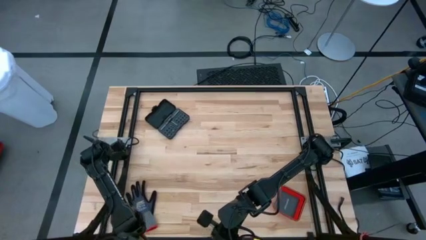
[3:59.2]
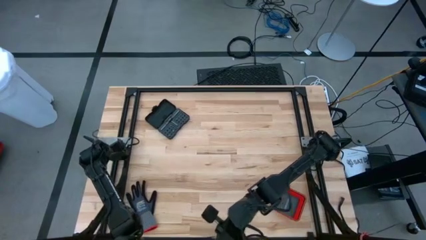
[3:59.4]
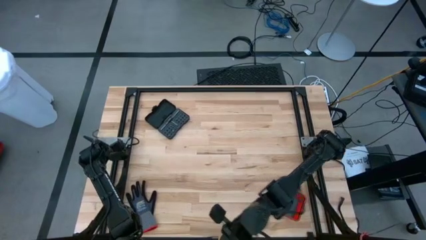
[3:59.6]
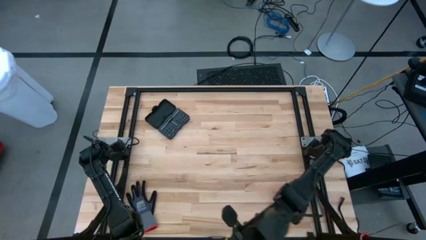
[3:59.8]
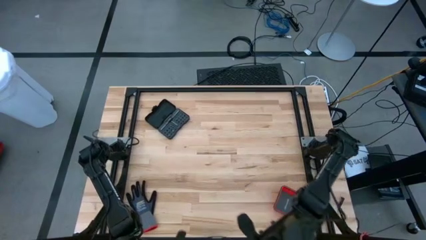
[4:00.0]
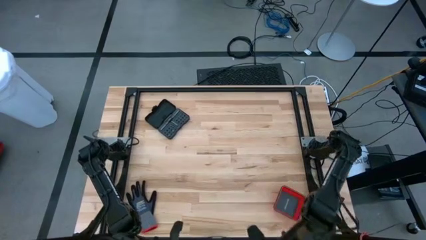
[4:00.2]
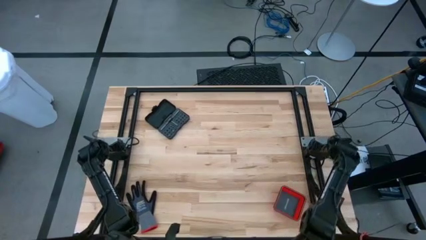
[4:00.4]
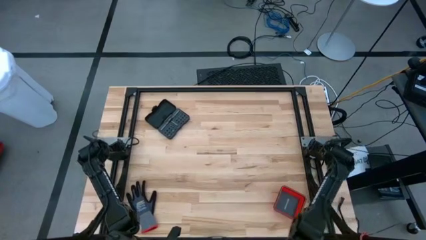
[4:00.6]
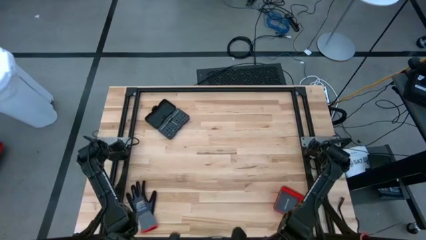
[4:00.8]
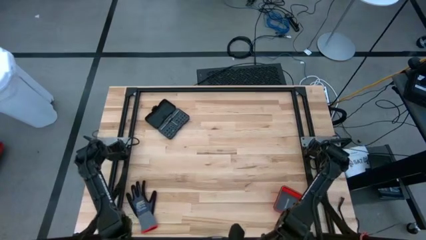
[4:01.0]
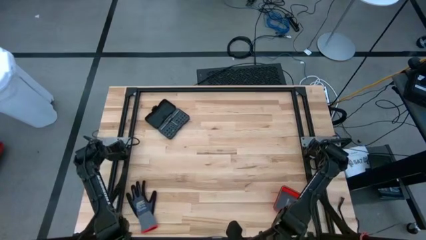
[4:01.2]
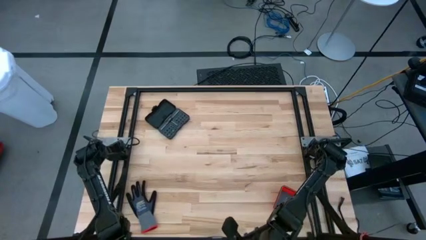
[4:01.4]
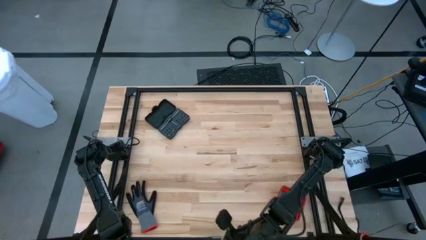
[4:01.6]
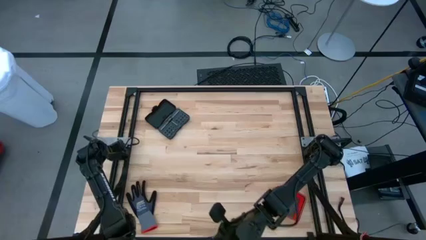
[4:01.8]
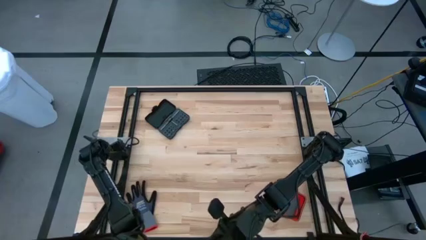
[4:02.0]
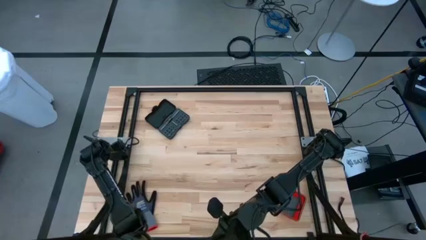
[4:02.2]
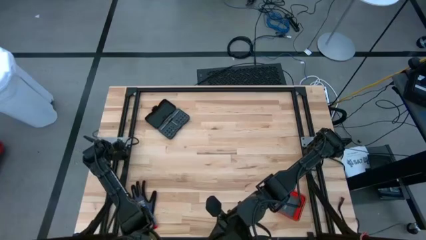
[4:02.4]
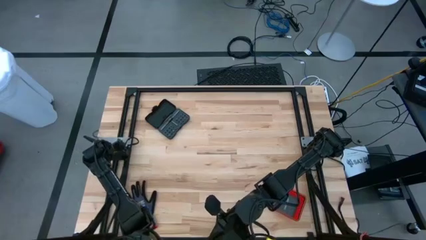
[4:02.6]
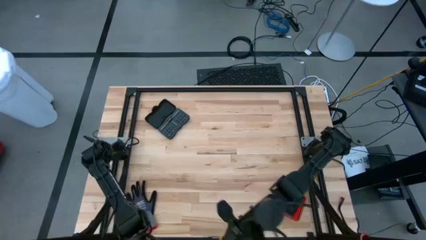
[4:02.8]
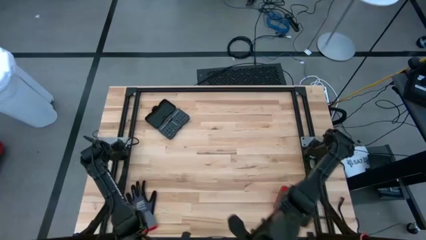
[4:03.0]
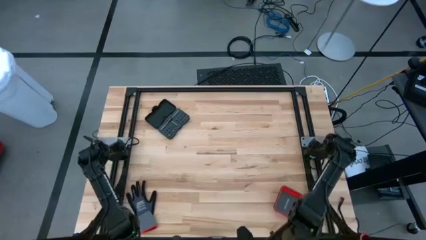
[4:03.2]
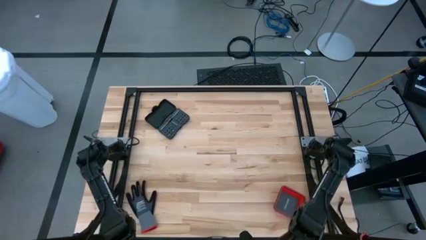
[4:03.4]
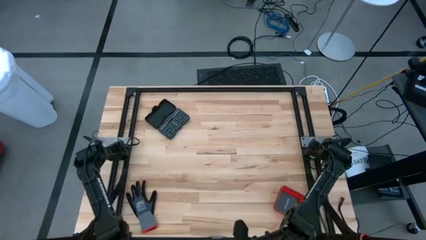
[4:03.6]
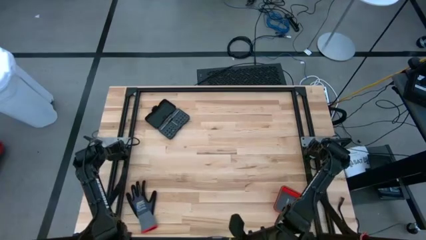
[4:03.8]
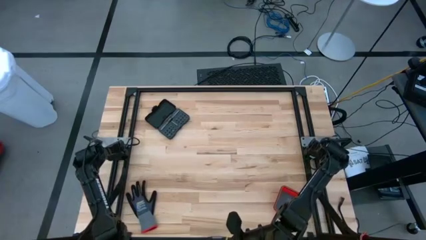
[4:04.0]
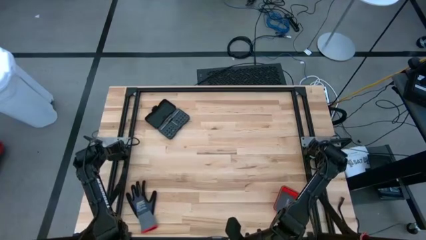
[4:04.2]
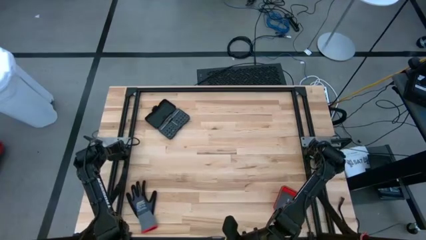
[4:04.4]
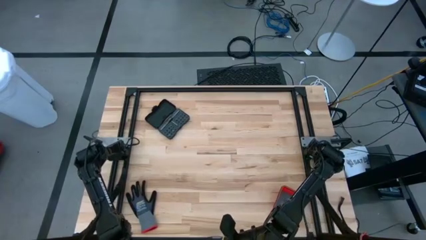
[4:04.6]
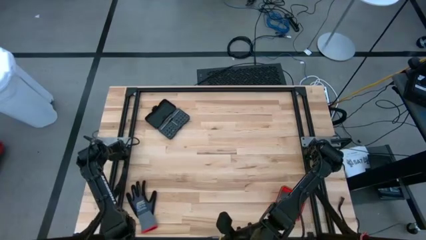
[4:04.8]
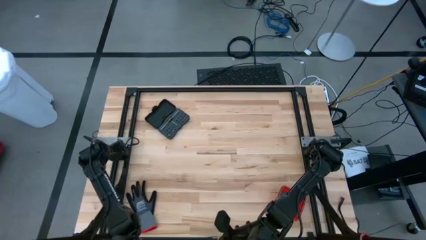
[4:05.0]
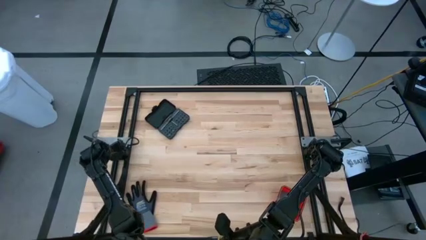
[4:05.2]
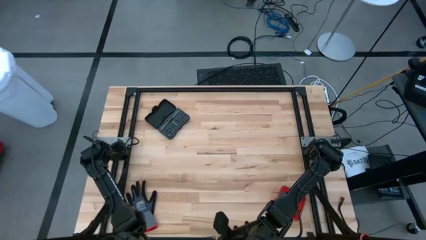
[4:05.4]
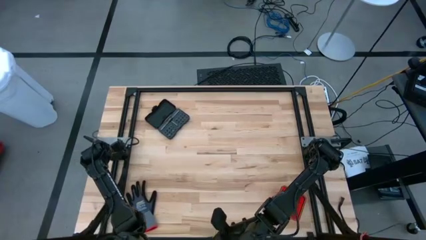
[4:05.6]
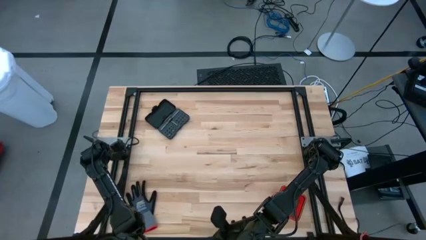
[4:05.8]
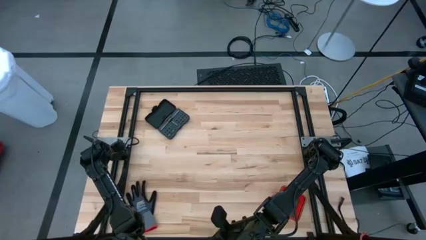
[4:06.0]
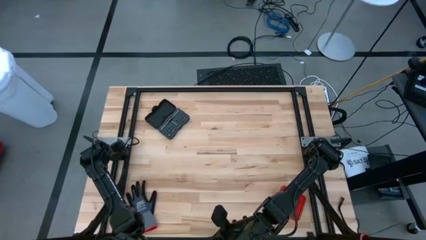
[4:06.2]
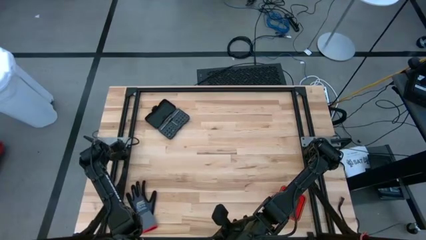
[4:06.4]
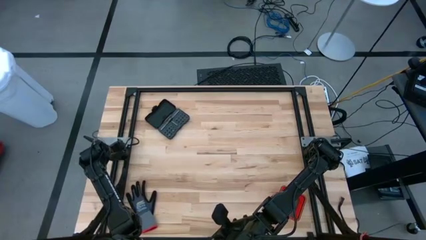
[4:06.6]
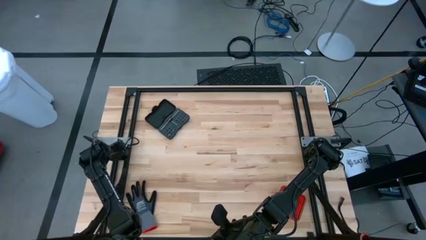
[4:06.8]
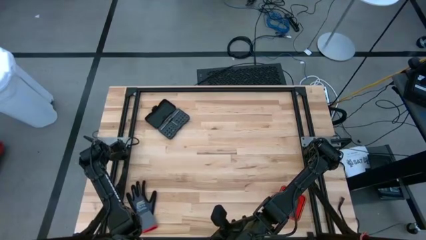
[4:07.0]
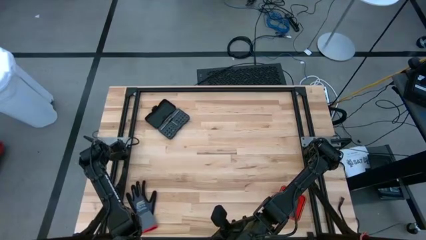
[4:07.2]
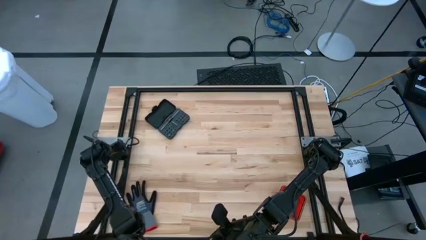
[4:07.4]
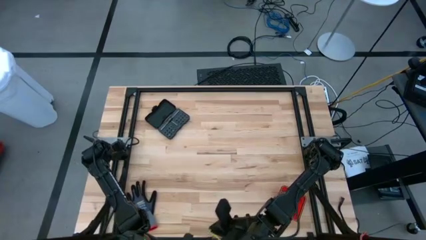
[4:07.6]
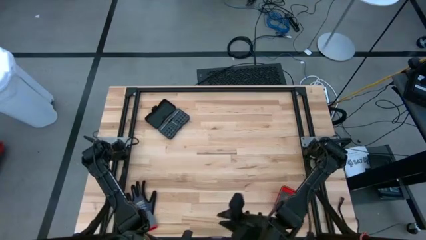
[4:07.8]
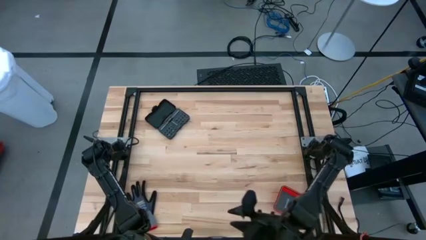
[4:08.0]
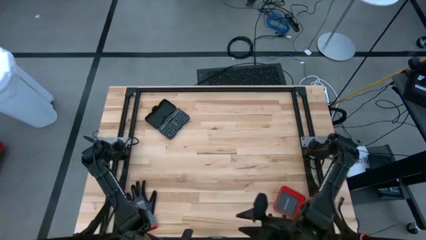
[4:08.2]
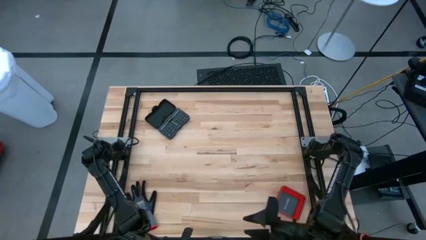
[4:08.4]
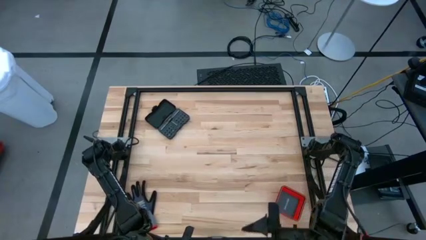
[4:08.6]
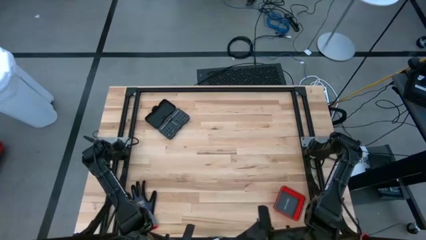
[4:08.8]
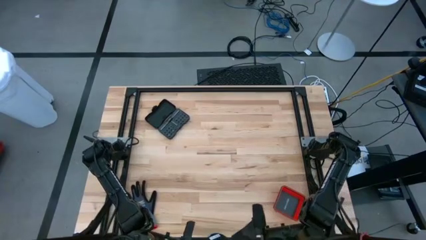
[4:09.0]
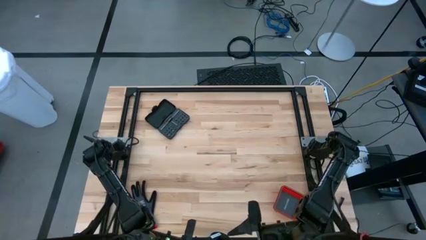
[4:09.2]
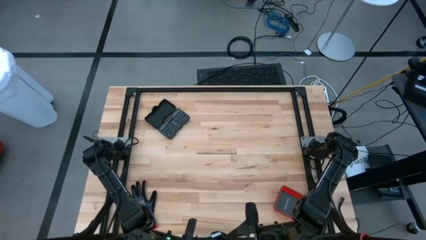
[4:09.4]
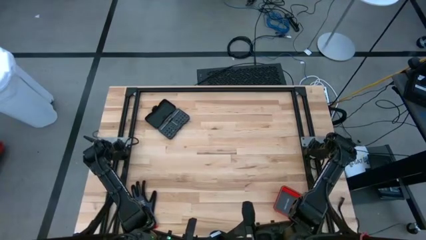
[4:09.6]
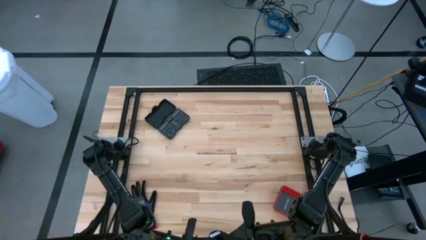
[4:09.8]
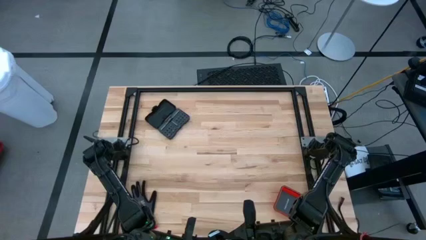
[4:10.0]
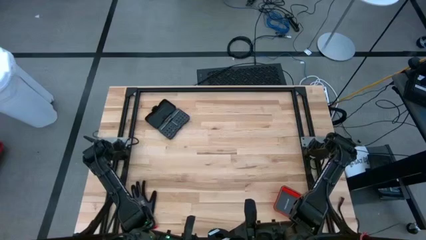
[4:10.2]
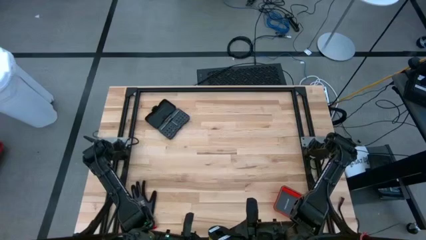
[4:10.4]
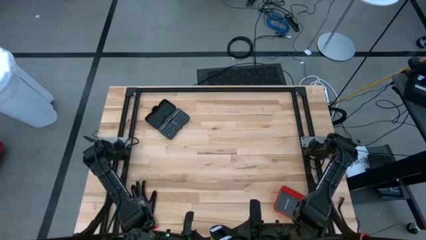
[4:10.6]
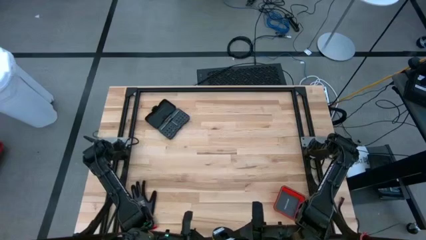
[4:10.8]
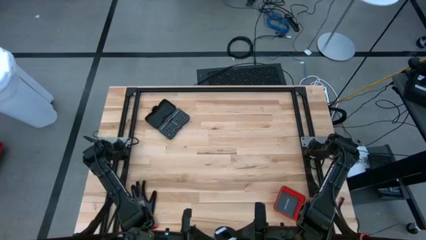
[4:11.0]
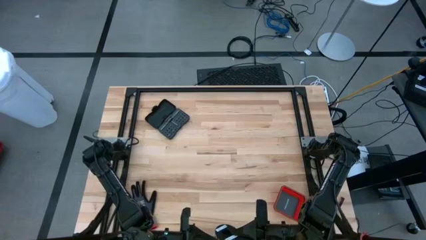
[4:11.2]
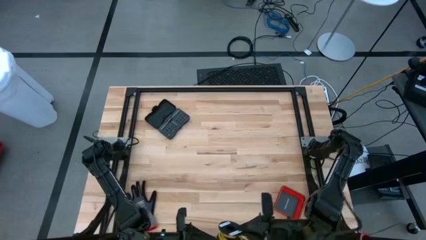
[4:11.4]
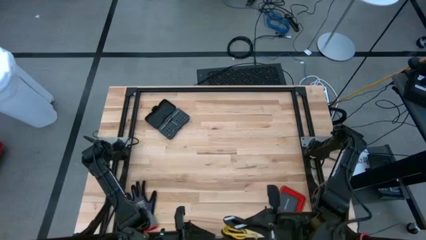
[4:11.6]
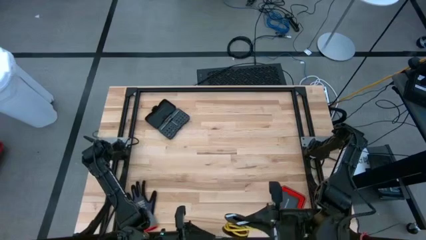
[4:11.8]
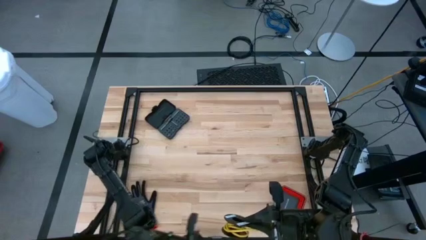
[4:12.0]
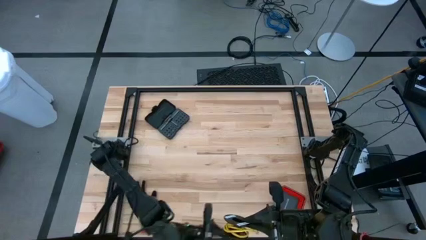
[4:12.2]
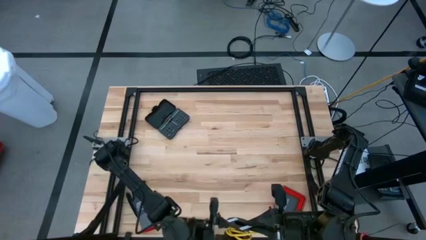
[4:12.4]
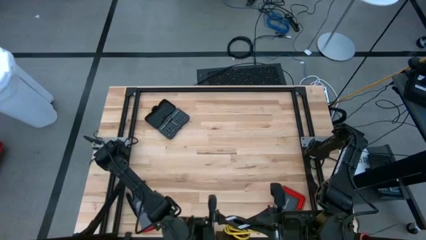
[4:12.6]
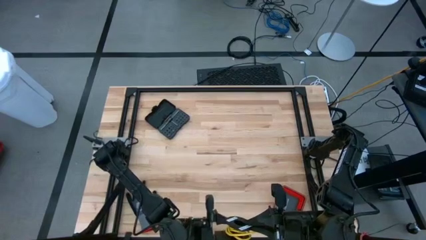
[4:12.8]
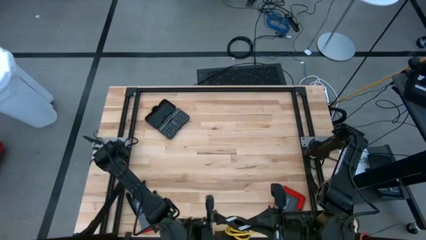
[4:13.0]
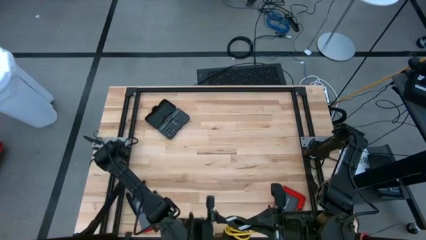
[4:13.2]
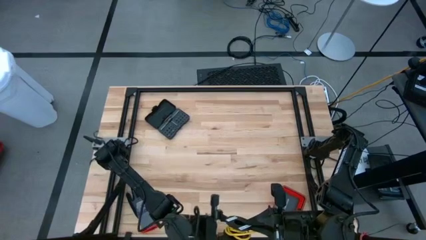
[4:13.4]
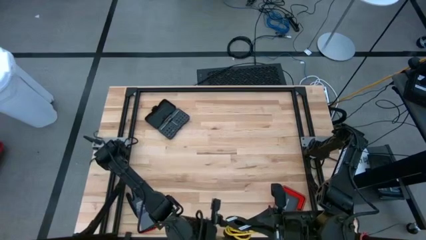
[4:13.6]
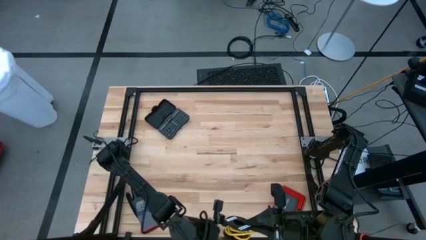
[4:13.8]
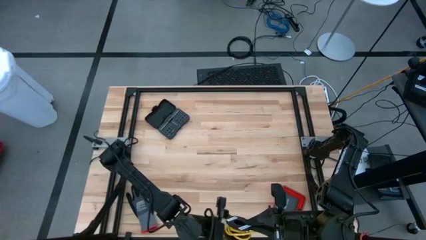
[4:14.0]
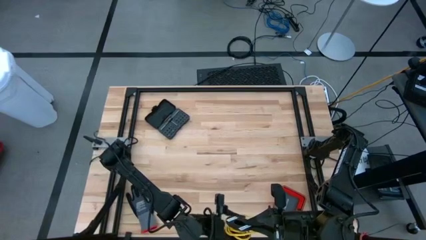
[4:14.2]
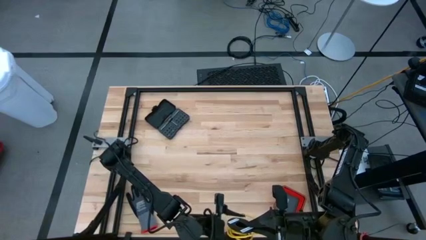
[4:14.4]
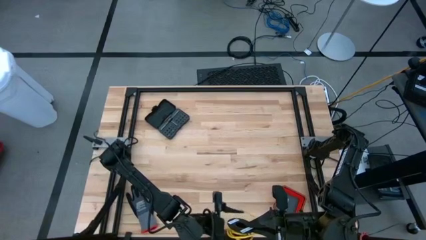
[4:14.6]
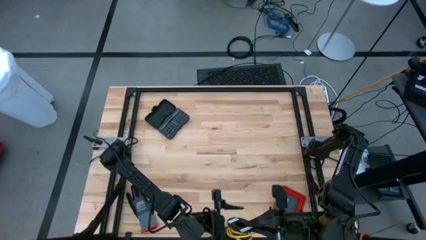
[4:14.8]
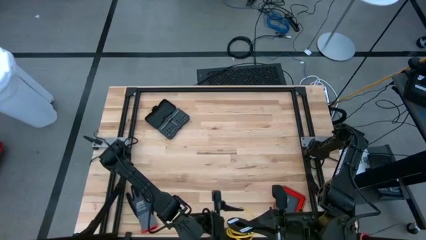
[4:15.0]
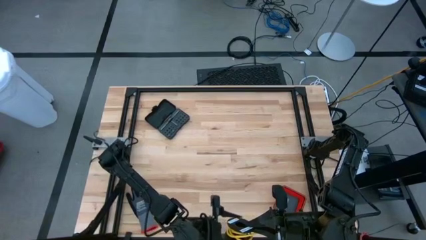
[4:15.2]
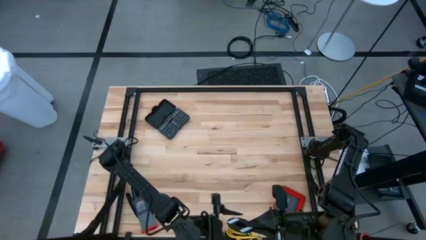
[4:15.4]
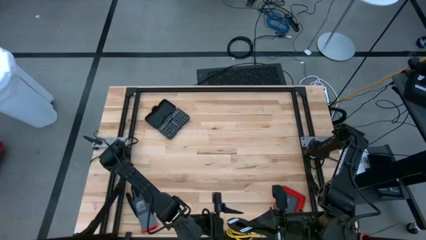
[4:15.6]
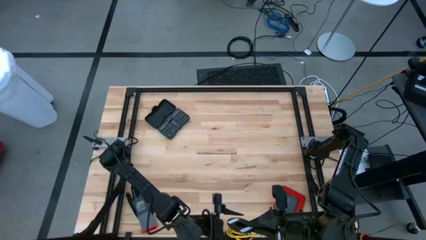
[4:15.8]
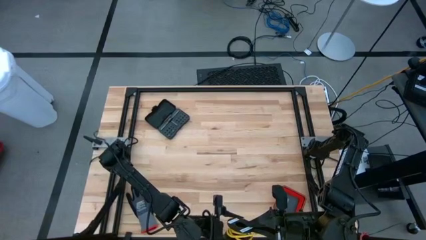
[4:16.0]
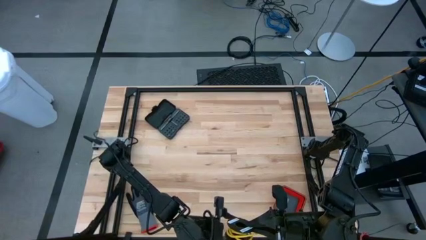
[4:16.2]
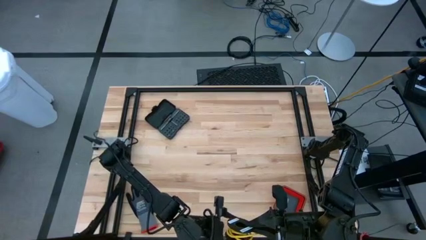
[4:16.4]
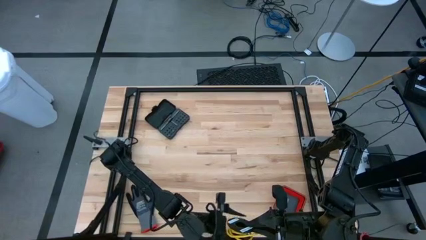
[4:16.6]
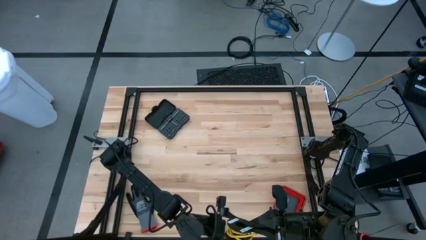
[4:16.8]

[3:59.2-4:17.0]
Task: Coil cords
Coil the yellow wire onto the spool
